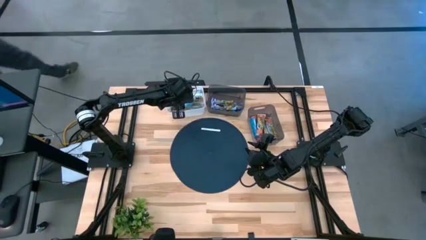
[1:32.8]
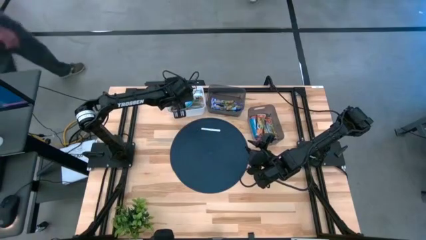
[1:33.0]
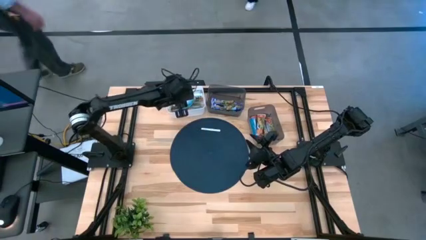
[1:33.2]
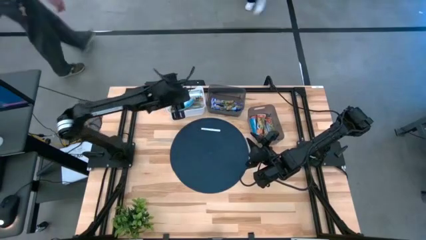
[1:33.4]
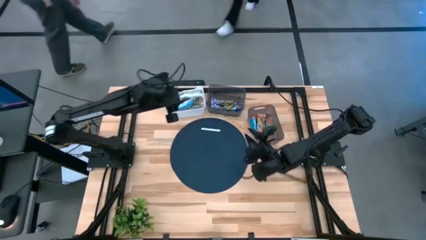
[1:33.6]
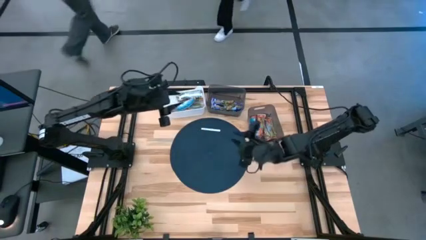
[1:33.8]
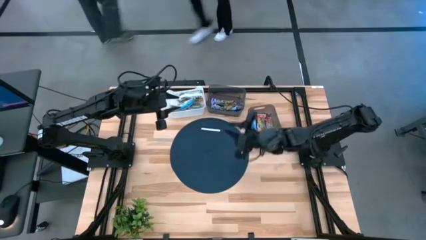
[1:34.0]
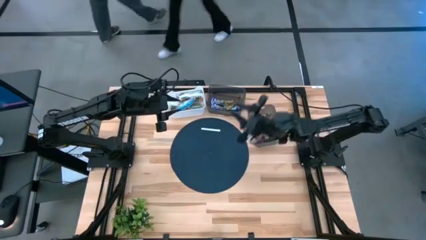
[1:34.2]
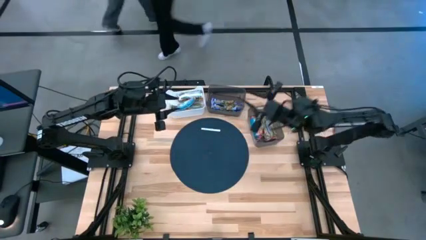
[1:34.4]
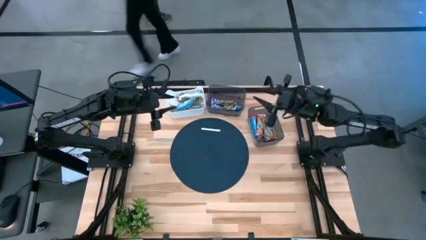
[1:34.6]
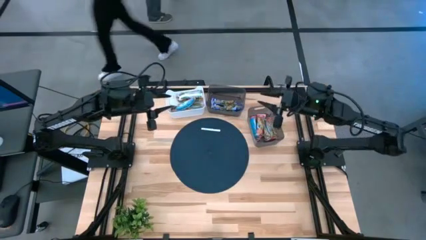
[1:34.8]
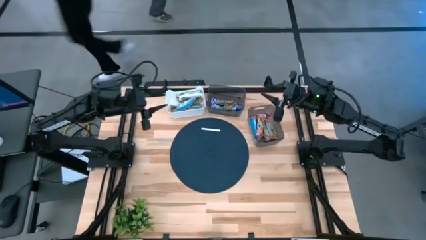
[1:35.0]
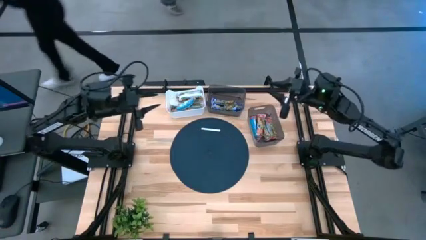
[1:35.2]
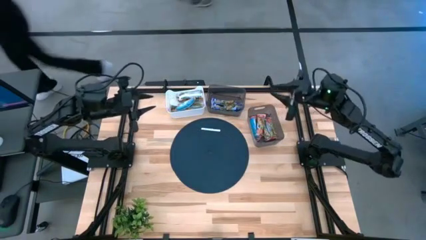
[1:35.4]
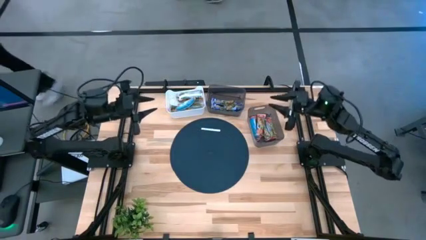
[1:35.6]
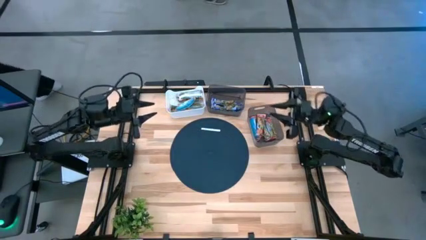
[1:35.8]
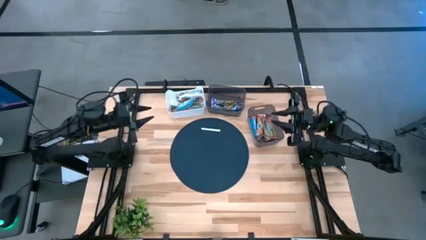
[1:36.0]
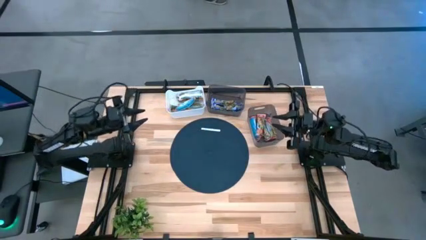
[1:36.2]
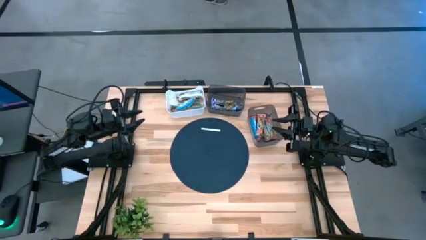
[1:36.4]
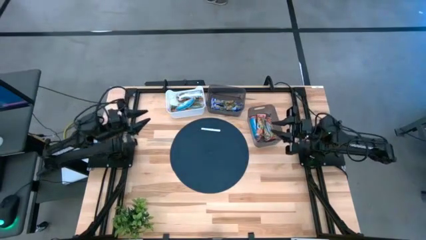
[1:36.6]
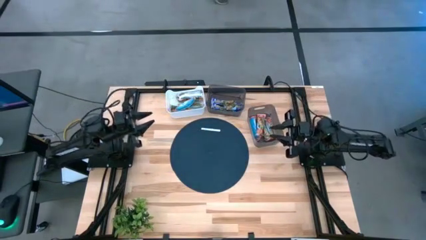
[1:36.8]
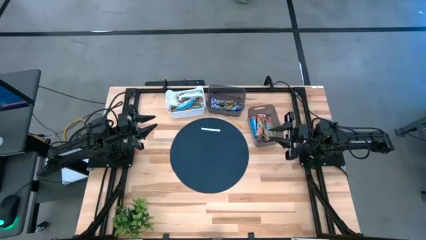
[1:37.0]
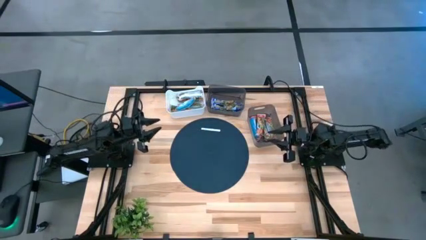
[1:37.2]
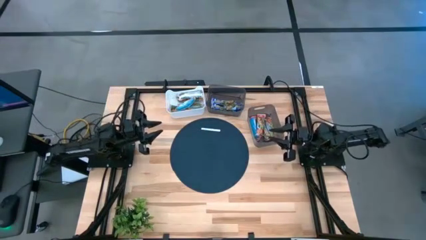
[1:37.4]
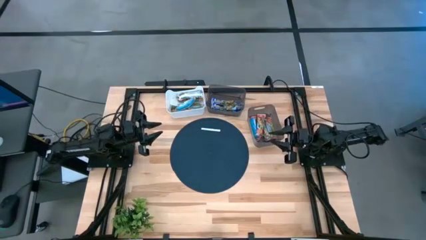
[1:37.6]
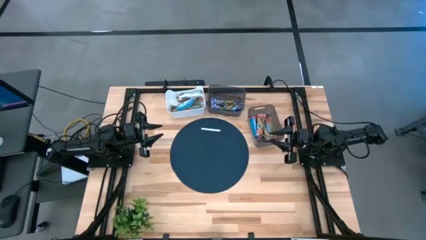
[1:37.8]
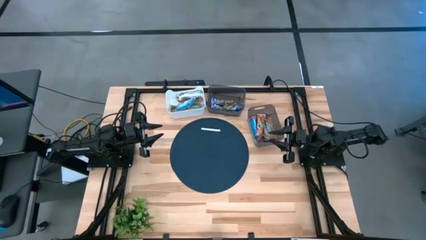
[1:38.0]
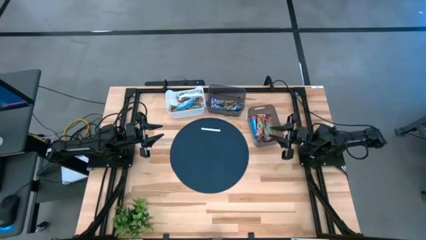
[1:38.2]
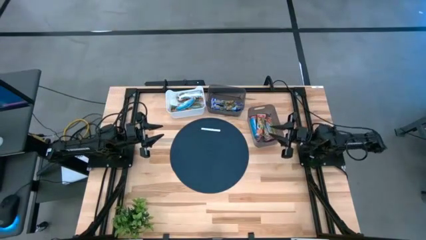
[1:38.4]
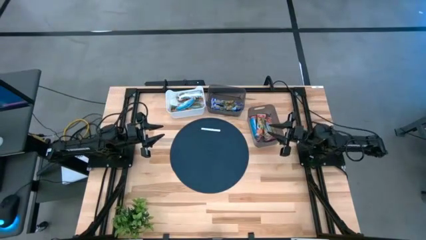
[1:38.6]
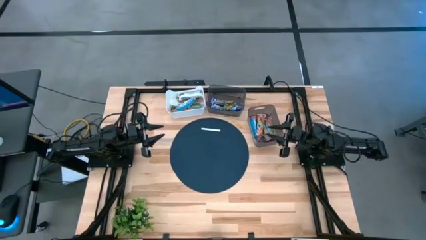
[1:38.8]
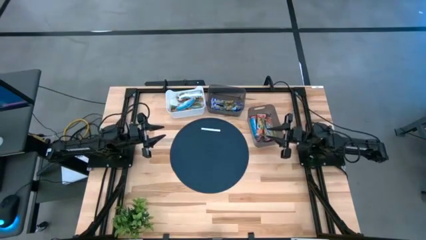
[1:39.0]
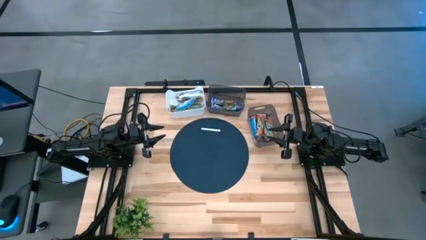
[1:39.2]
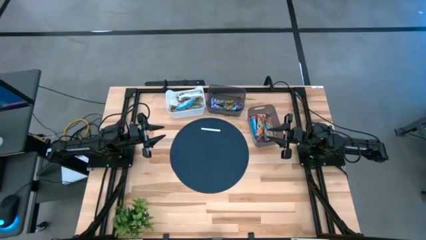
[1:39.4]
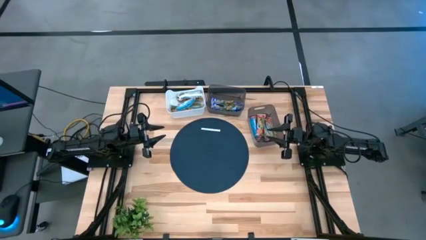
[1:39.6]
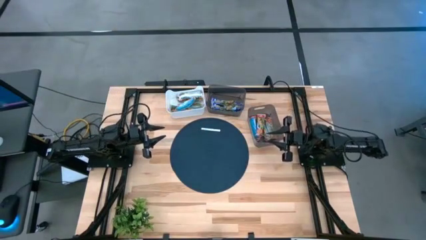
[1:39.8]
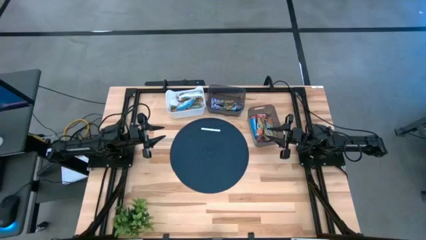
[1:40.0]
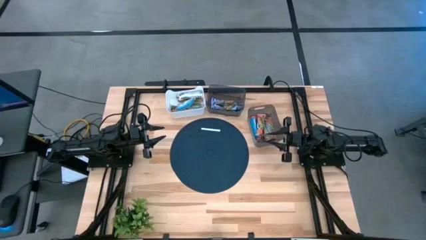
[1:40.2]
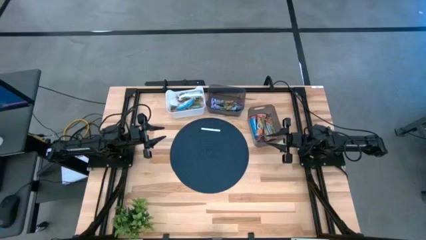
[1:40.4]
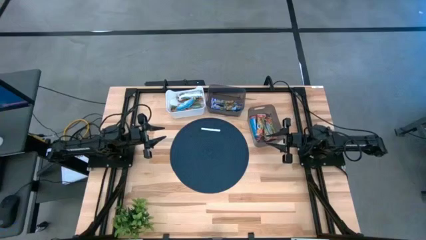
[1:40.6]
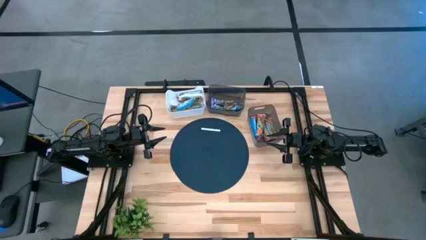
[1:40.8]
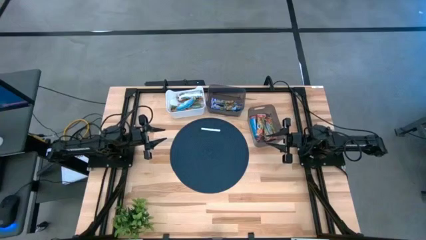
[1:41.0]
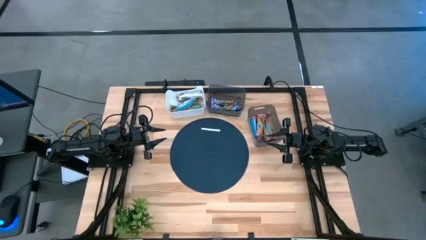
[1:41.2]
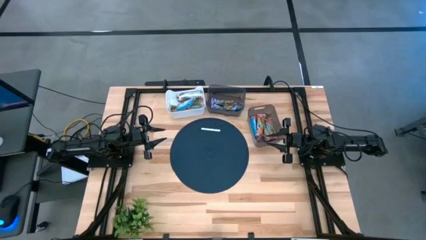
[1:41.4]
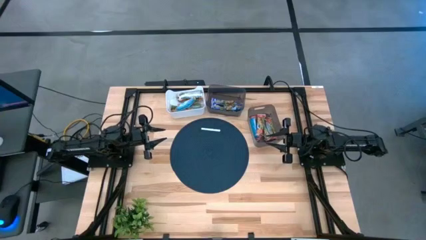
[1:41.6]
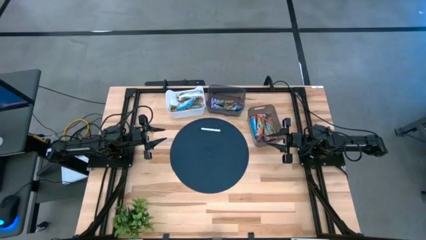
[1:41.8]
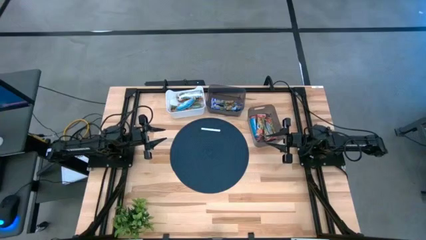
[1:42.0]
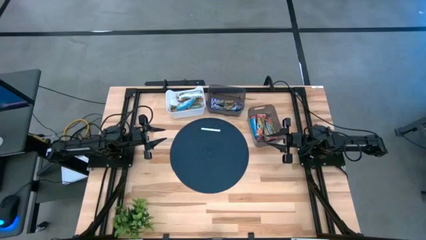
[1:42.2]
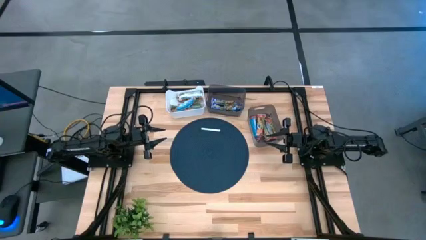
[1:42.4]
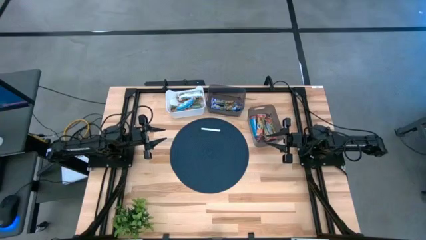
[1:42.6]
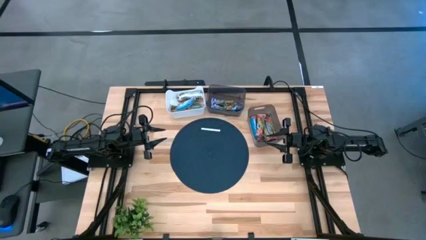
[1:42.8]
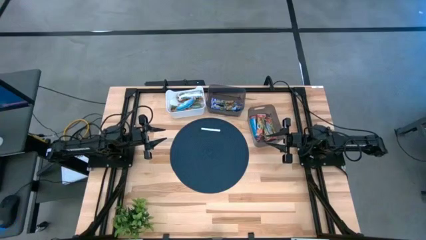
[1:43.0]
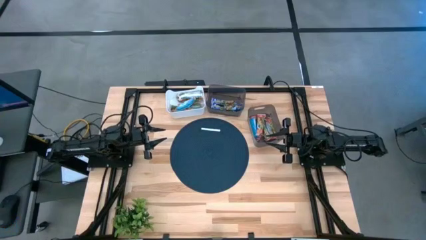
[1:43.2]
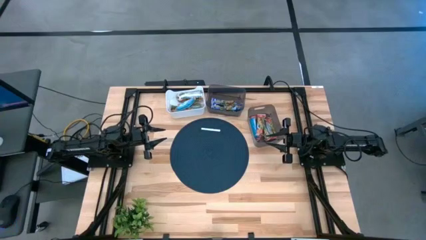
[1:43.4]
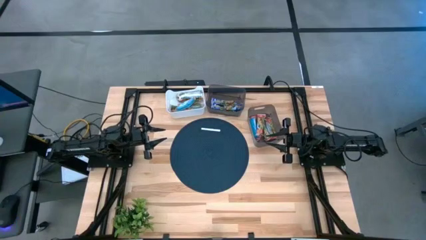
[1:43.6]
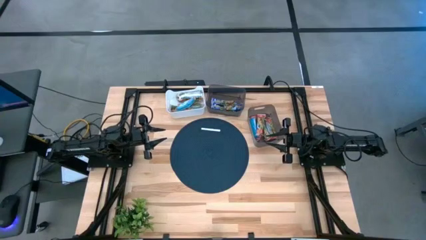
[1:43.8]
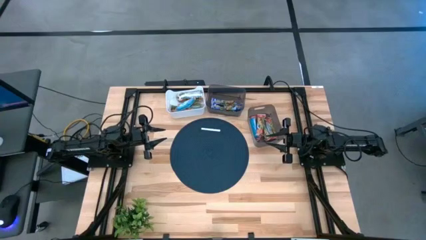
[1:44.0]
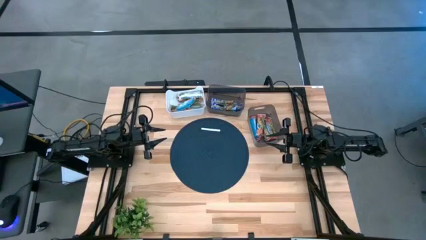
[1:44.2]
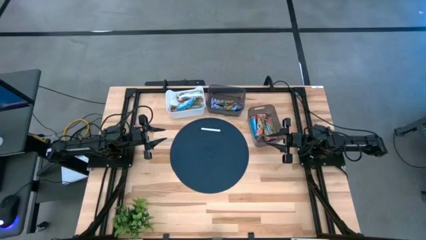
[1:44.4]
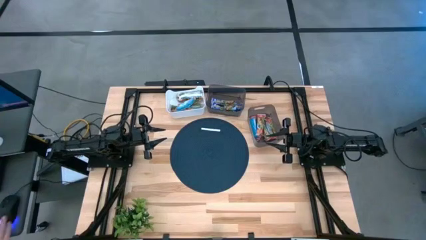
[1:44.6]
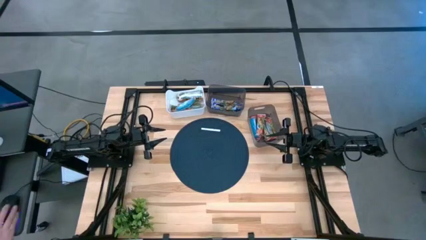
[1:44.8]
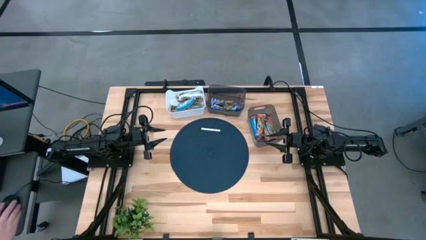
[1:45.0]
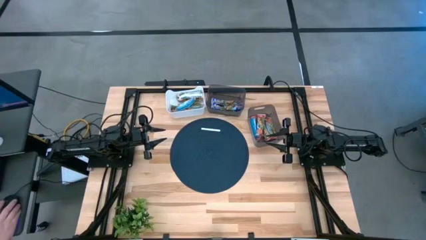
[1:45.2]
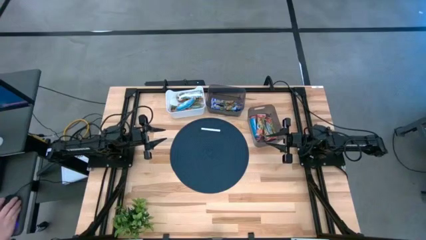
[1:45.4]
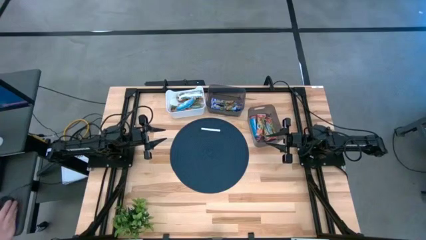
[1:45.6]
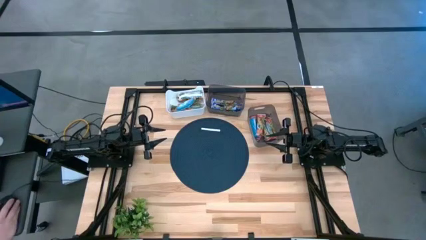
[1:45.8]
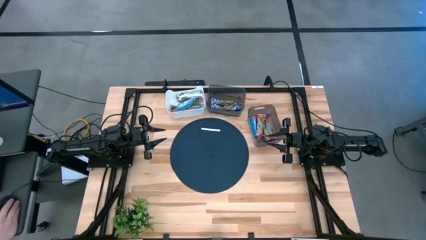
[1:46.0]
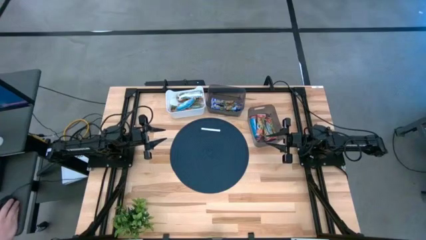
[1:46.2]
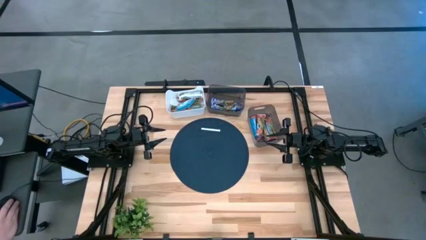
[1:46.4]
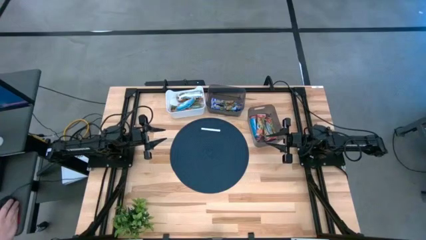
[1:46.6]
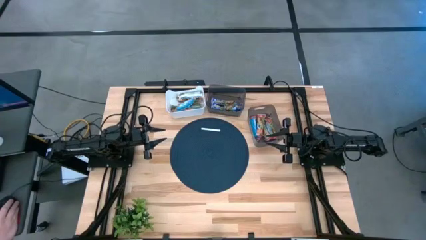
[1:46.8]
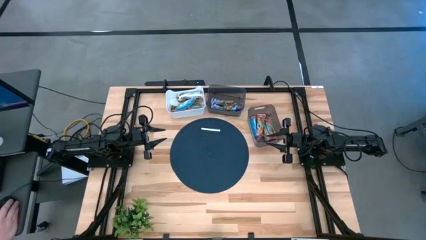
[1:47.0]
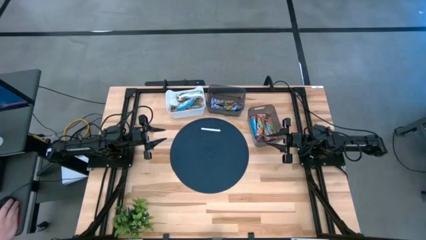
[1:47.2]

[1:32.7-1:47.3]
Task: Pick and place Granola Bars by type
Return to Home Position

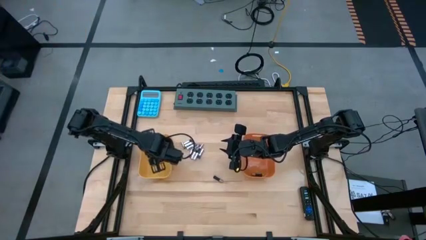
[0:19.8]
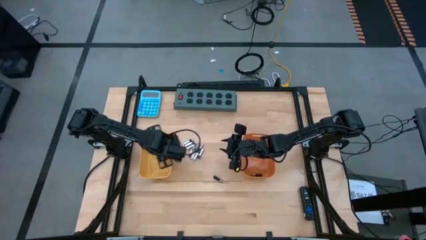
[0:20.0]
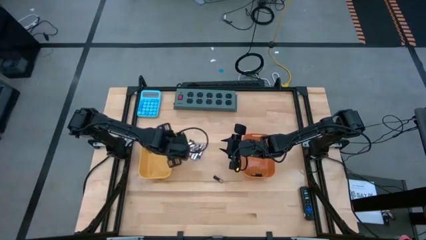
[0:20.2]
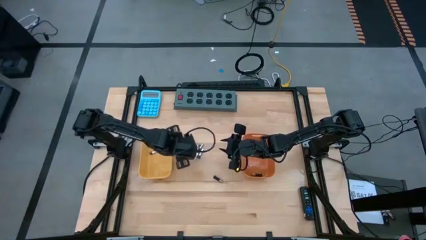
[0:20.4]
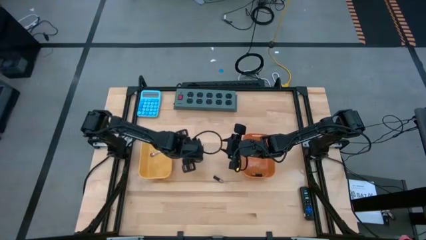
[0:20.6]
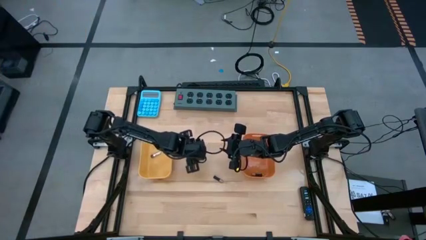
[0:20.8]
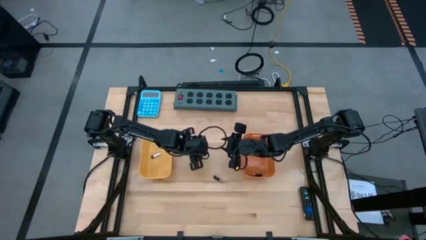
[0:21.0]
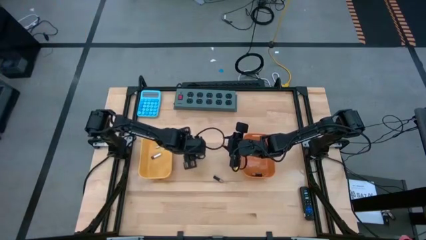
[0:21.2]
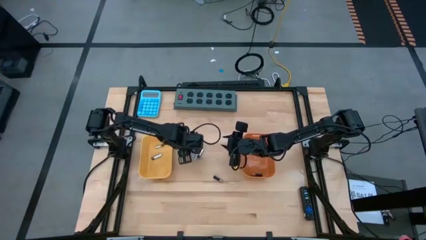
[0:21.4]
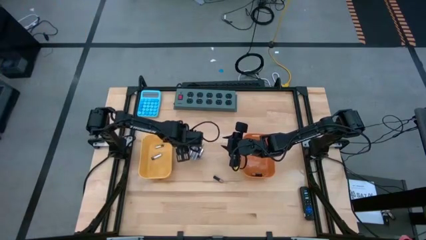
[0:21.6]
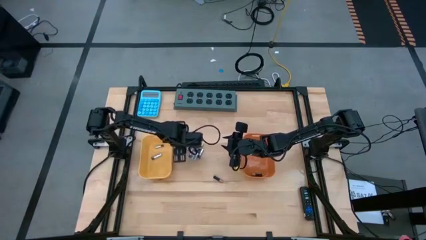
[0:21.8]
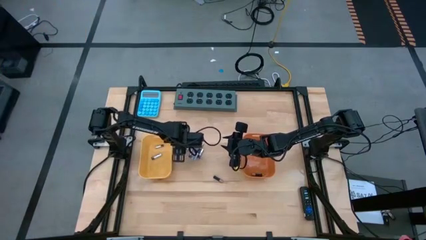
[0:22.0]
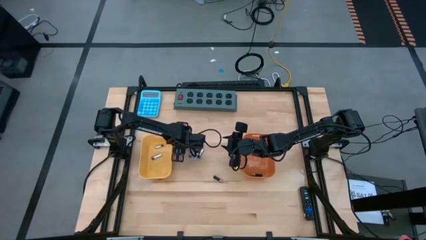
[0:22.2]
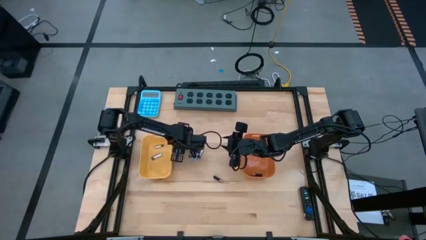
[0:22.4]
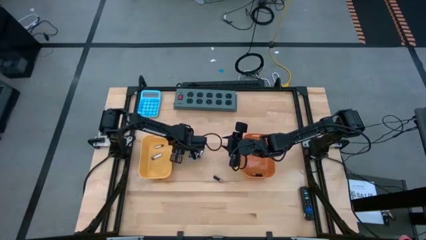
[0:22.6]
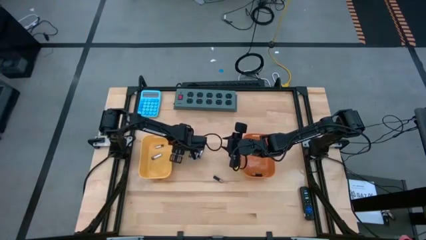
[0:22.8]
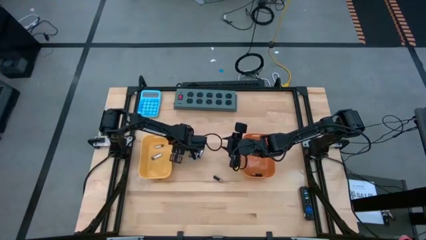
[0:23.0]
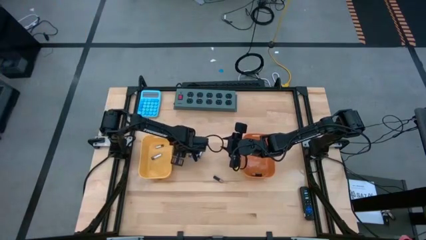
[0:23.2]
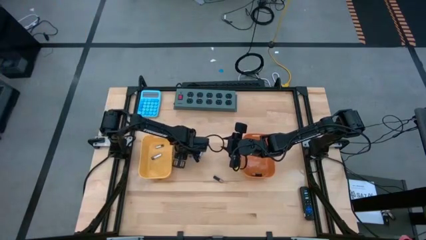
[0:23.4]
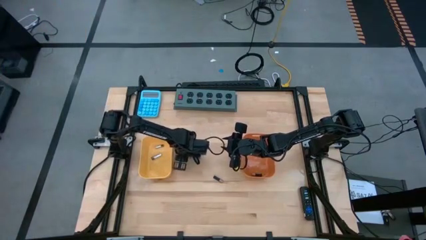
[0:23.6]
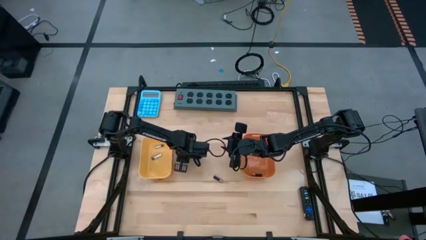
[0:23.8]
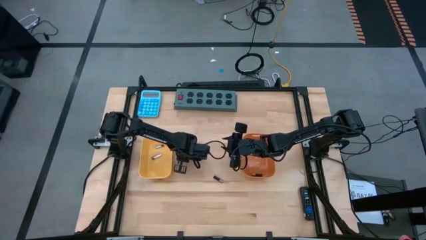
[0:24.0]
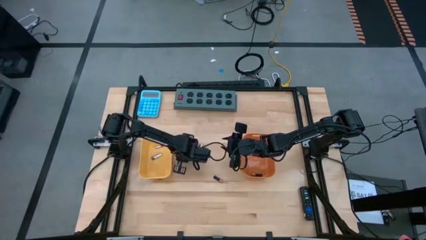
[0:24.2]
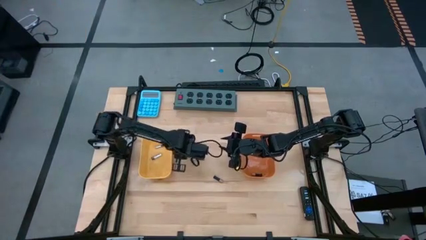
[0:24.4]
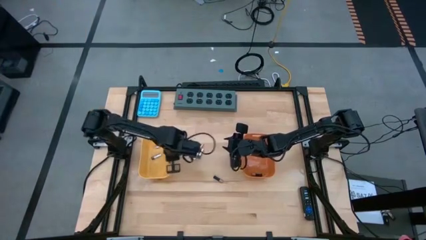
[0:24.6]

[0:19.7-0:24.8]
Task: Sort batteries
Put the silver battery into the yellow bin
